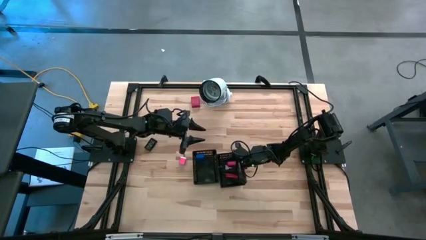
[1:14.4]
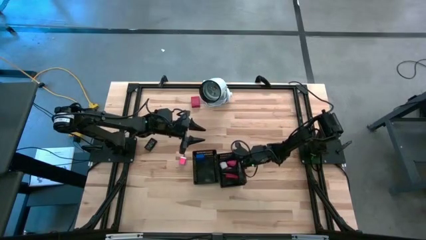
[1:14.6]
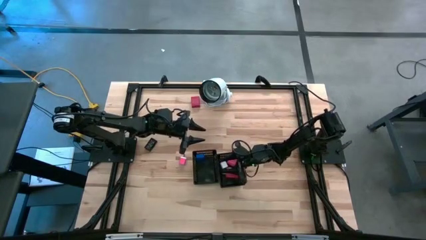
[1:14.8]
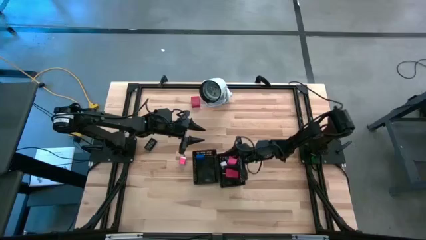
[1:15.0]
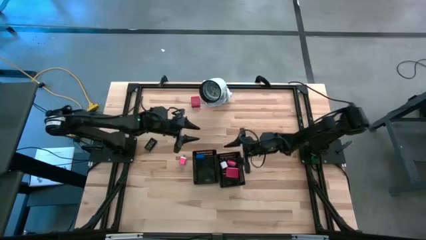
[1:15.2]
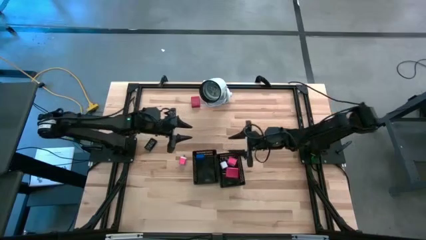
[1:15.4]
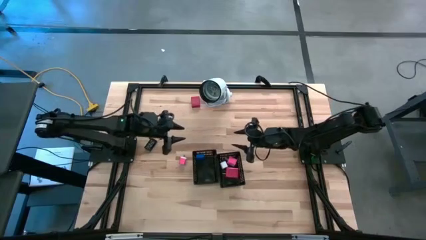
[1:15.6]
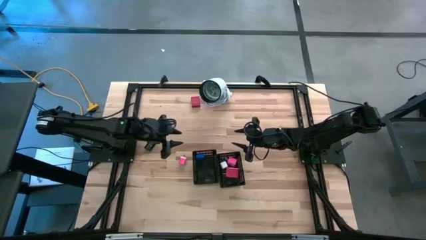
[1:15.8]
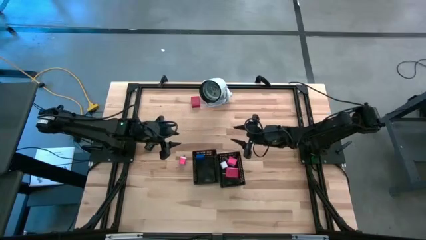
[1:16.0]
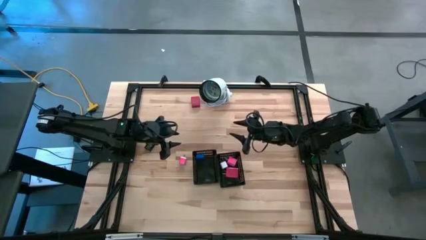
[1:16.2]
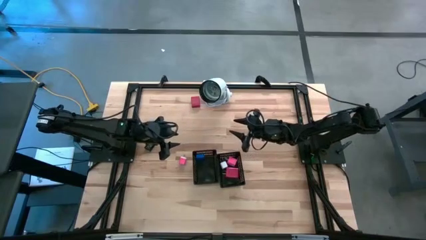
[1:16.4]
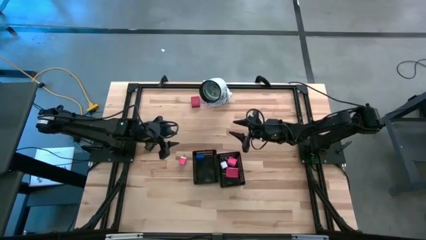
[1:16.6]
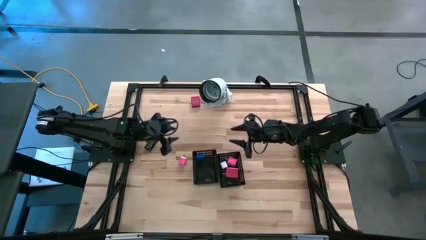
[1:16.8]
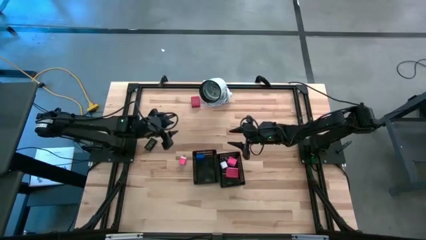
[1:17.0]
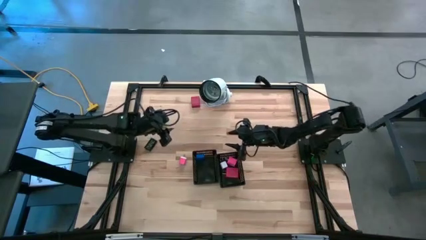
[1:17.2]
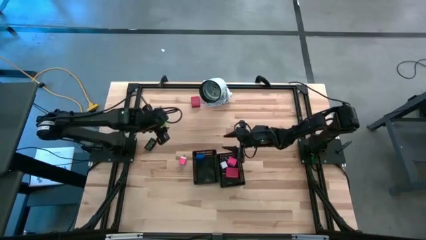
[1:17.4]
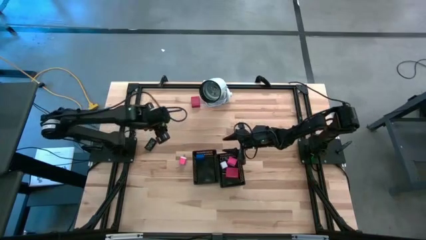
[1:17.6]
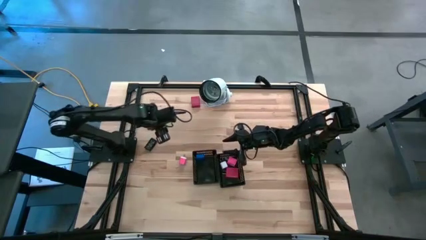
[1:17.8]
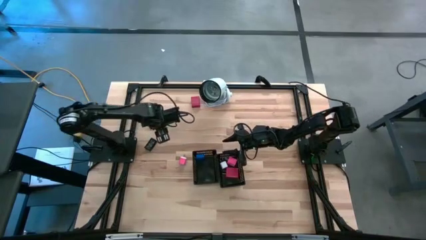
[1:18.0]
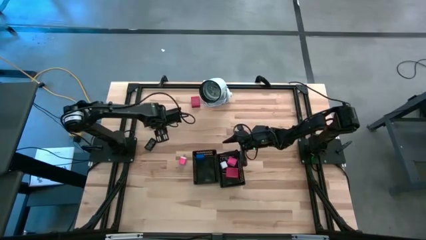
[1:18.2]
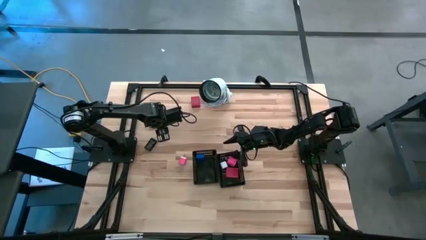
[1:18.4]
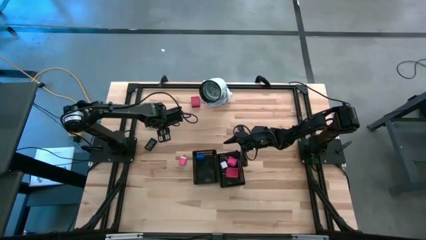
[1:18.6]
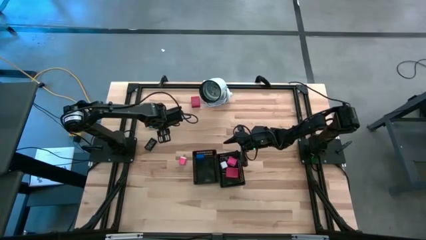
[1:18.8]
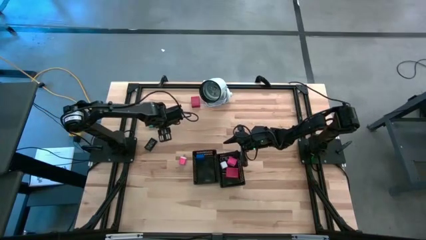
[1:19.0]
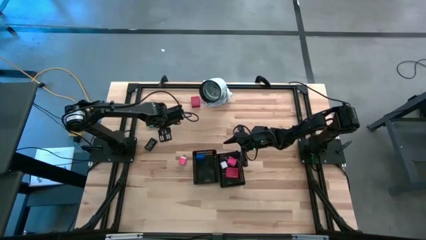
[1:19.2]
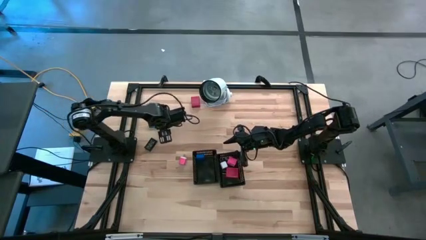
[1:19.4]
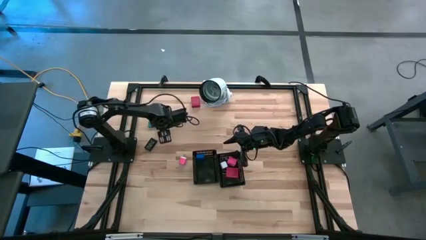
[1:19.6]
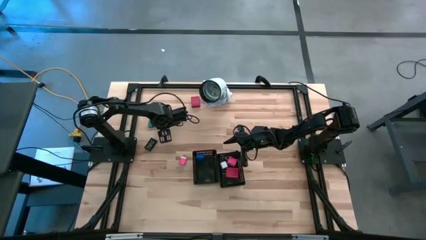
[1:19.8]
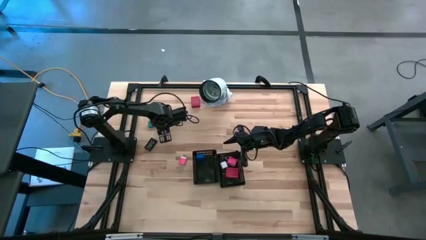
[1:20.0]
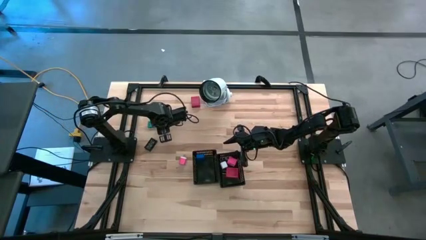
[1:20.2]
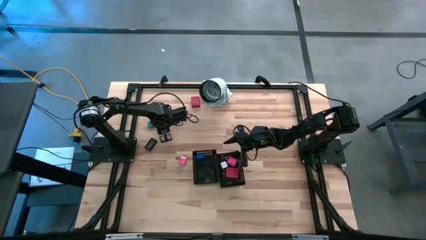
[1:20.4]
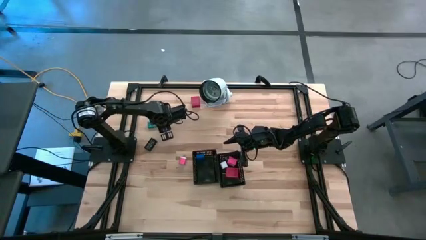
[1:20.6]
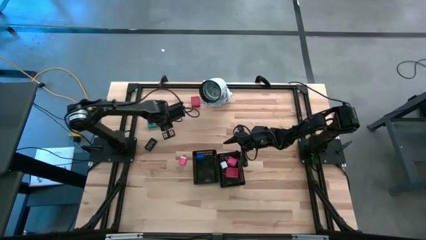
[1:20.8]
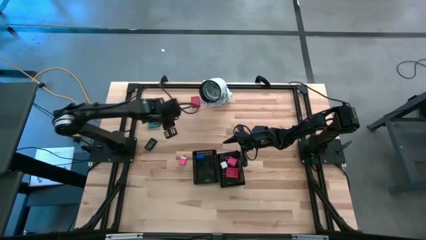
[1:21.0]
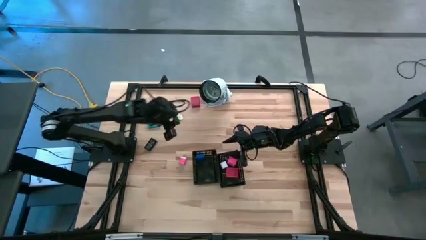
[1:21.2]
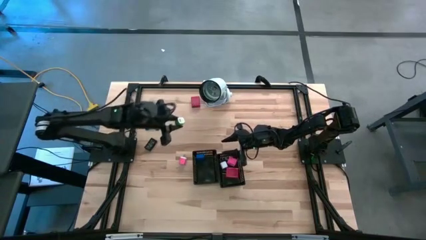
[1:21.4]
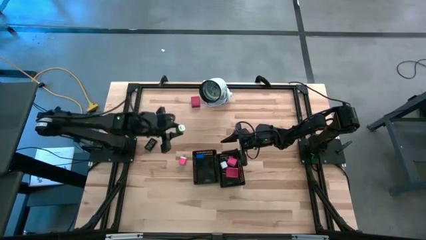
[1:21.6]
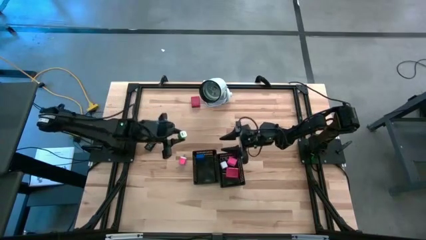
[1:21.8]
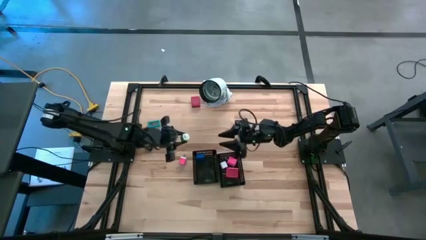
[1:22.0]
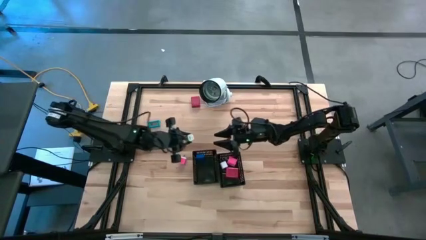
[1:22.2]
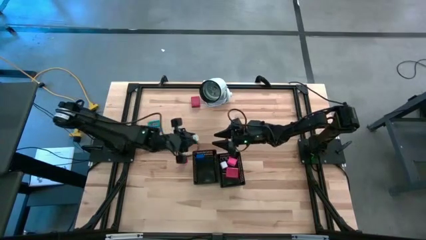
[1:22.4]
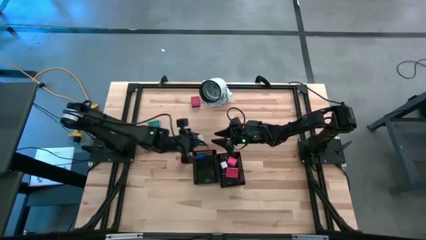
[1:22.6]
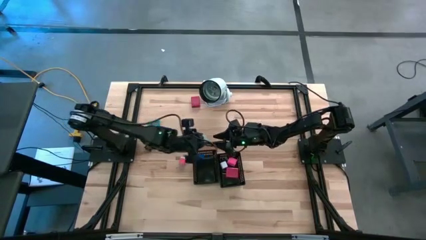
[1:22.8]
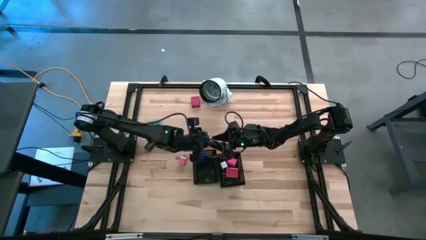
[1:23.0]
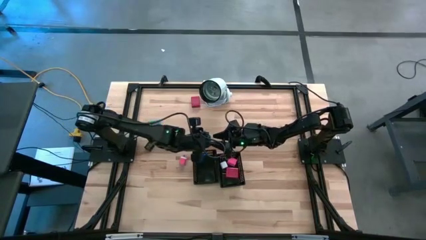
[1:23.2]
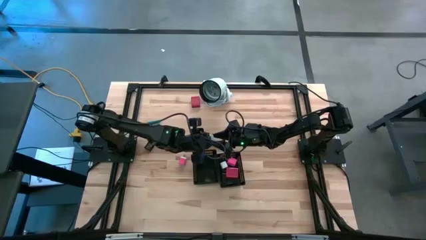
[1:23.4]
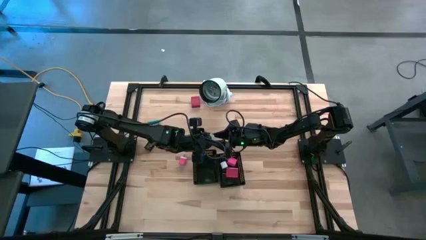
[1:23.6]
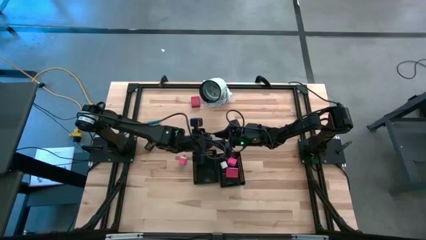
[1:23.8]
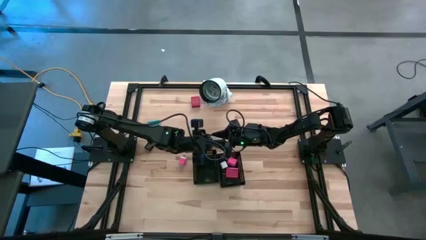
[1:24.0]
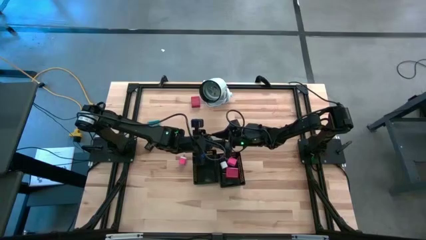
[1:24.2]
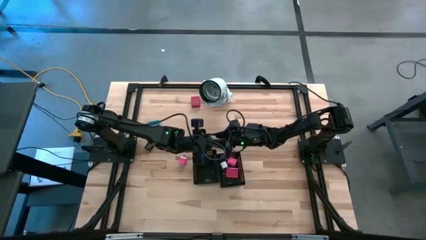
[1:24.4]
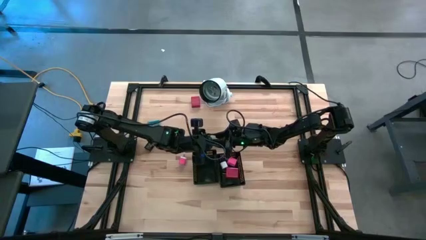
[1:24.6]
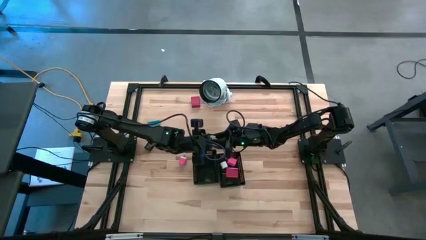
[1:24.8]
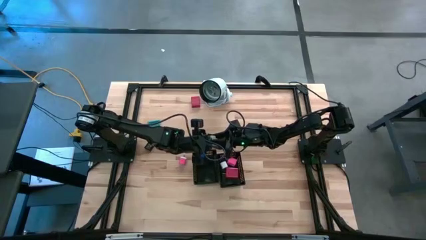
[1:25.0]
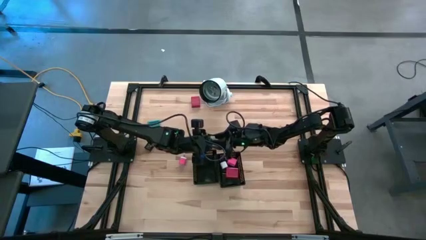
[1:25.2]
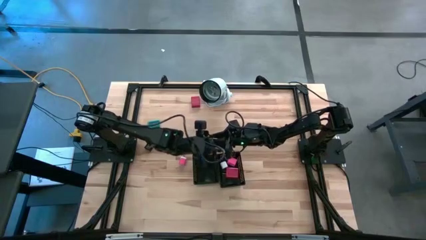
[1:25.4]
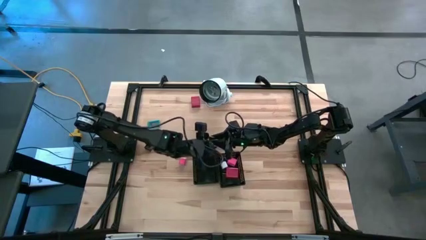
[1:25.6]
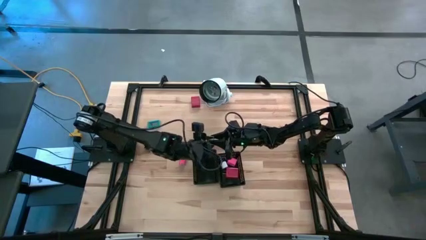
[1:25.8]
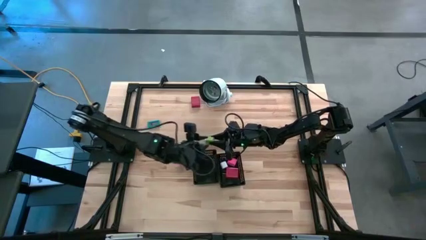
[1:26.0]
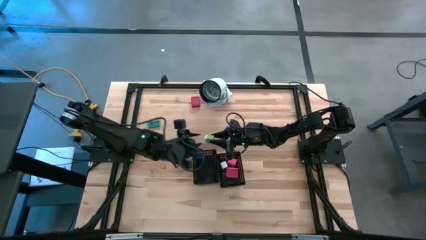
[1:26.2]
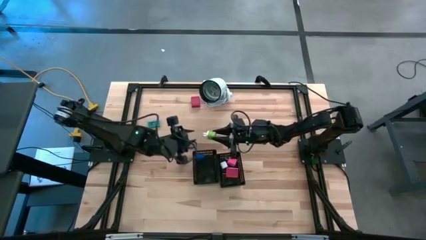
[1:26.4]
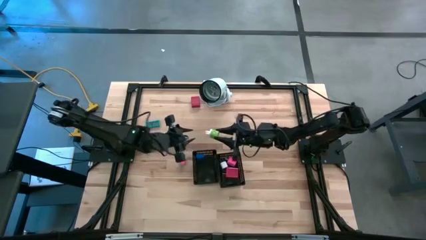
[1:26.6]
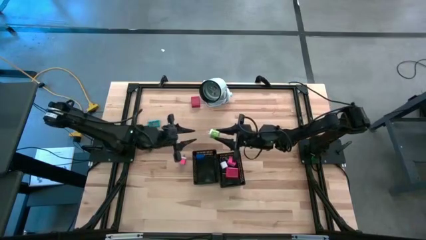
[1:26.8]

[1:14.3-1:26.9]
Task: Pick & Place Office items
Put the green charger adapter into the right black bin

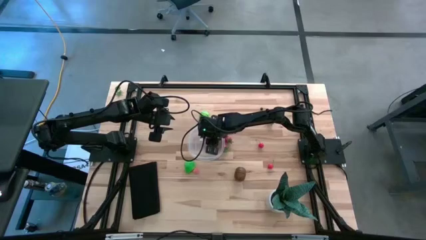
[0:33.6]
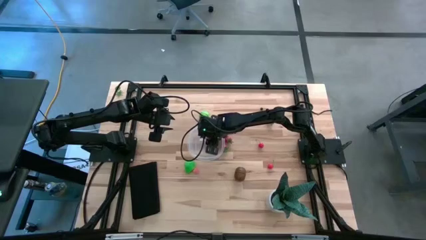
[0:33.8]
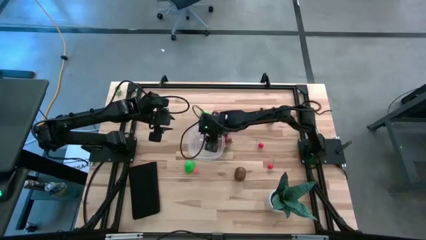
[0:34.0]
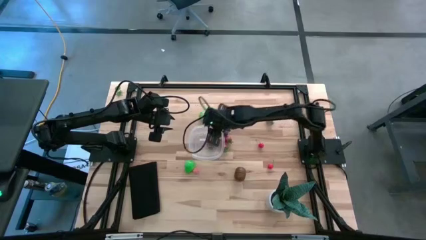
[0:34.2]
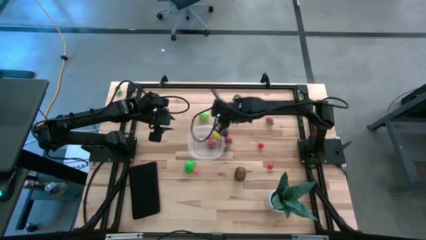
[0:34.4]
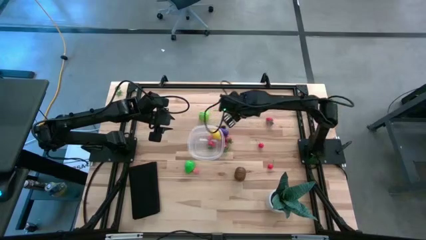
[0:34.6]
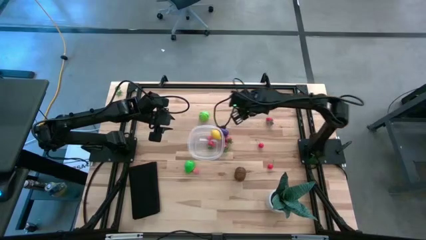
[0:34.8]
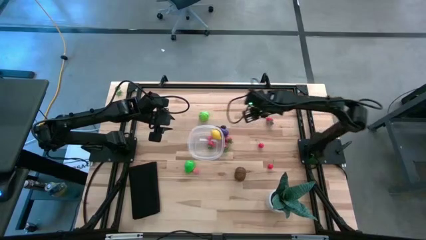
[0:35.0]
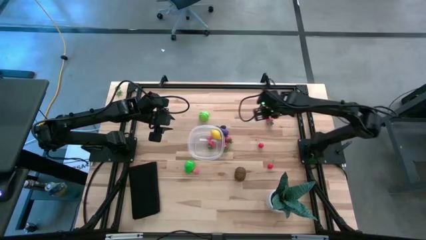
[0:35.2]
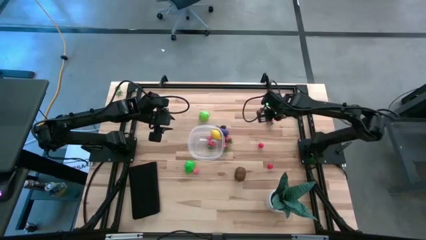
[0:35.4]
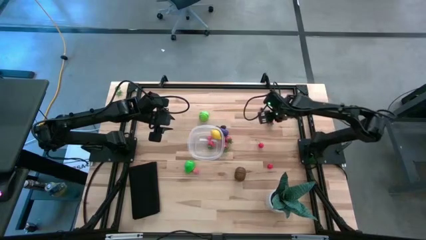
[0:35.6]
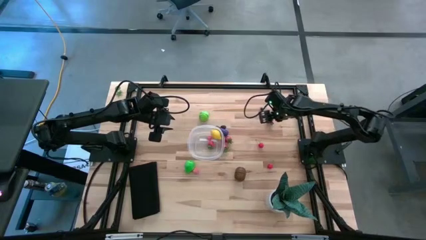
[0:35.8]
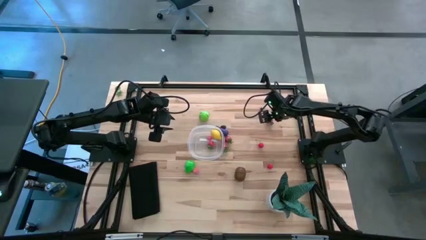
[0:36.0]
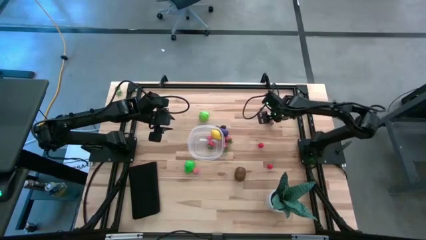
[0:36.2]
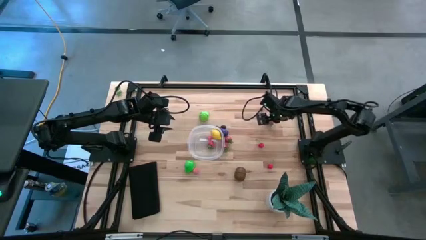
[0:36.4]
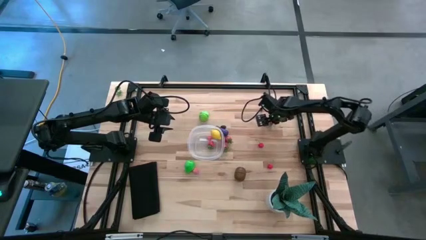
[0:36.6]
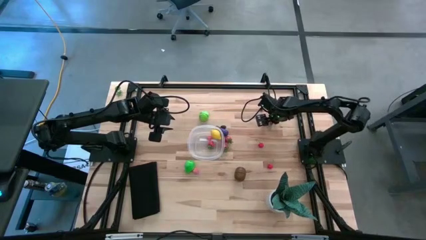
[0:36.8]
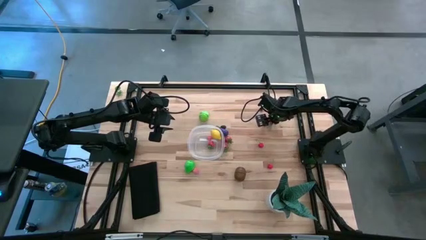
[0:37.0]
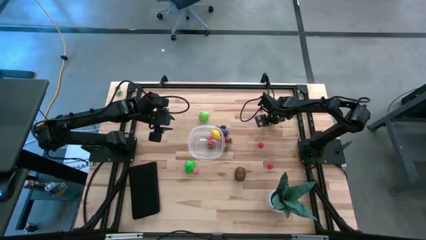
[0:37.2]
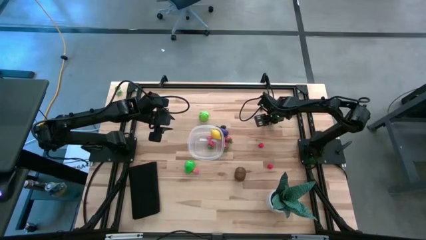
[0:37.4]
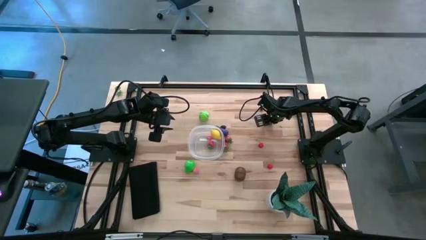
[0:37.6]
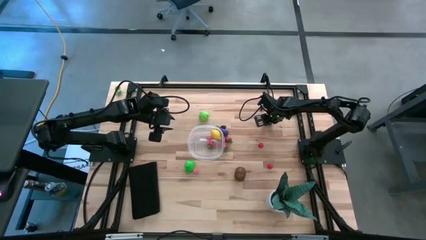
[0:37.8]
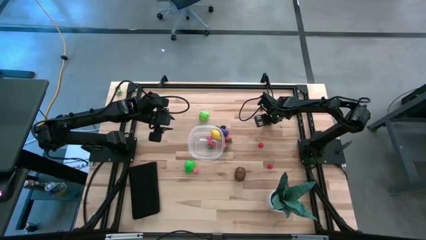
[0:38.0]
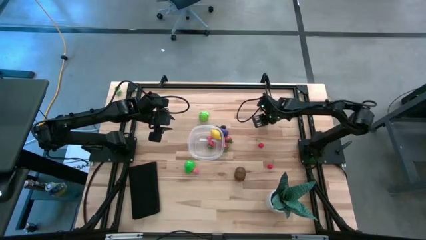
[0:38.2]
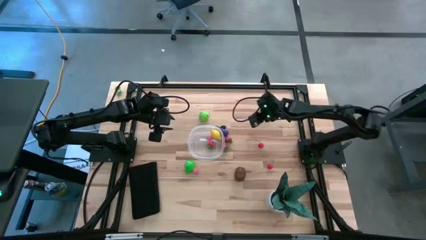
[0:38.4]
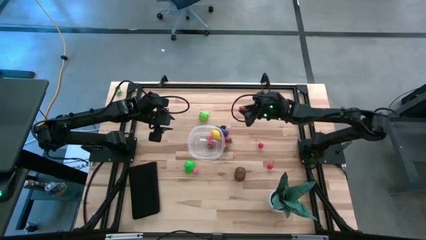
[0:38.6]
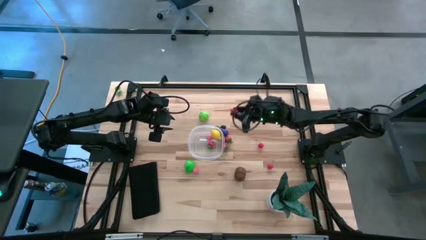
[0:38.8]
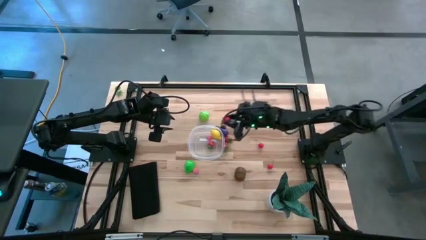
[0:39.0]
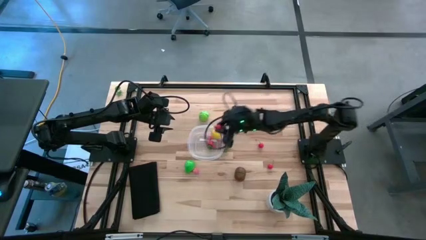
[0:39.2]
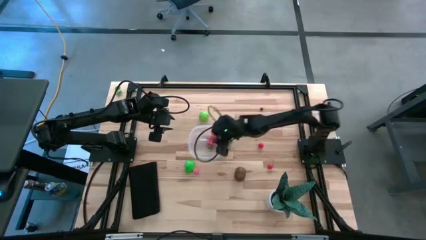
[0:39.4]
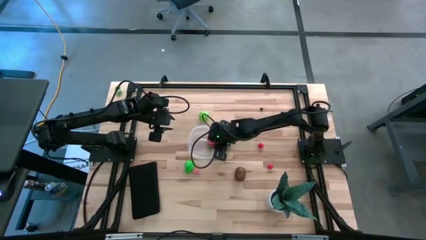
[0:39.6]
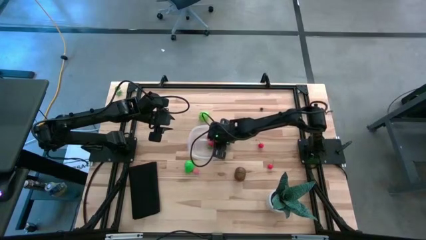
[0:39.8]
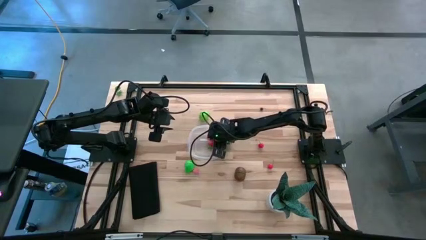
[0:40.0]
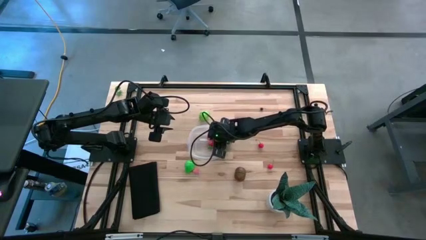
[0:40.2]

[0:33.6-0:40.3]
Task: Pick and placing Produce into tupperware
Put the top right strawberry into the transparent bin
